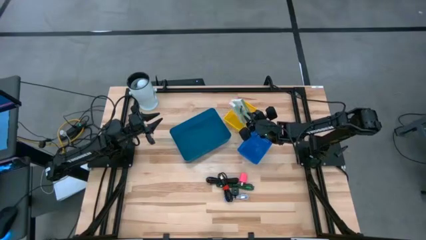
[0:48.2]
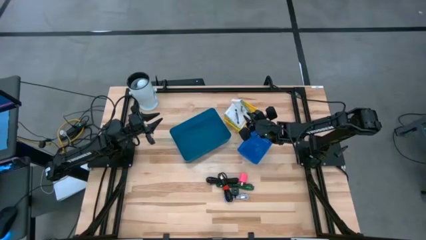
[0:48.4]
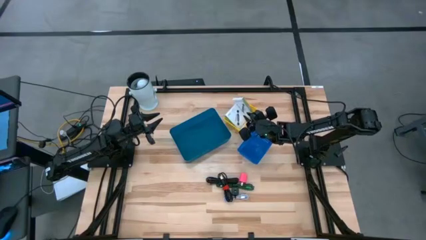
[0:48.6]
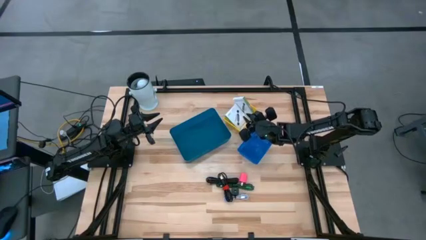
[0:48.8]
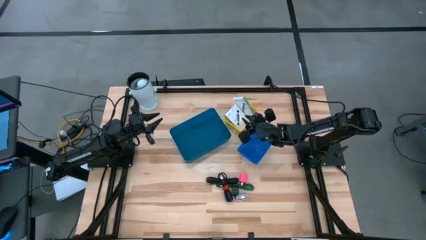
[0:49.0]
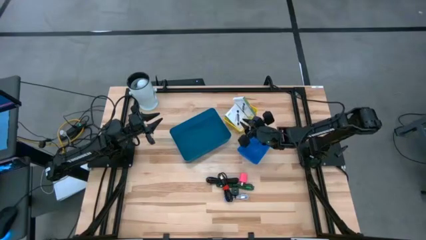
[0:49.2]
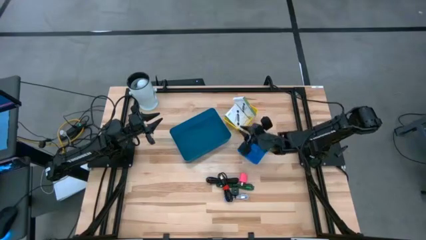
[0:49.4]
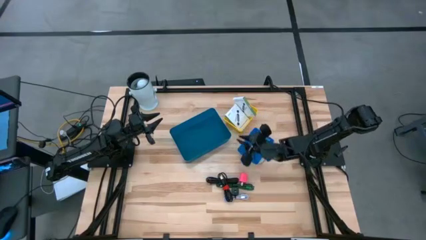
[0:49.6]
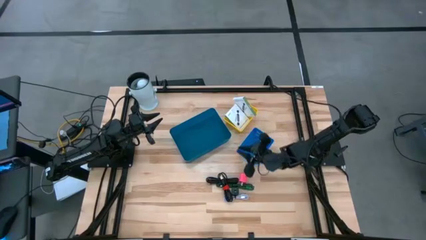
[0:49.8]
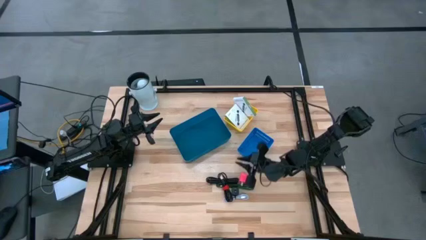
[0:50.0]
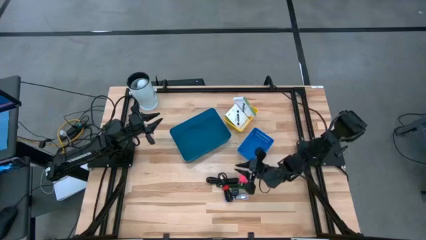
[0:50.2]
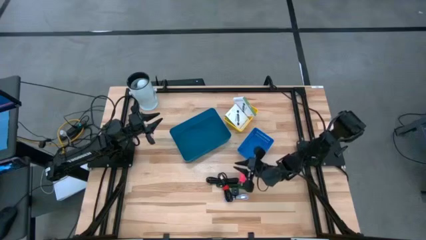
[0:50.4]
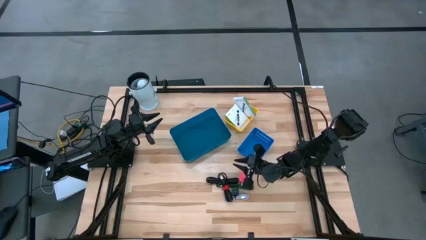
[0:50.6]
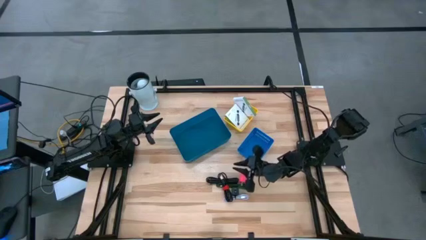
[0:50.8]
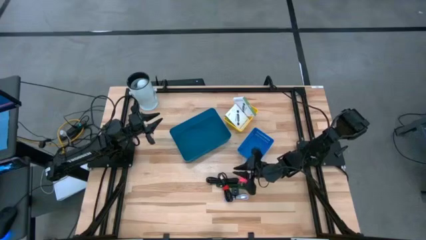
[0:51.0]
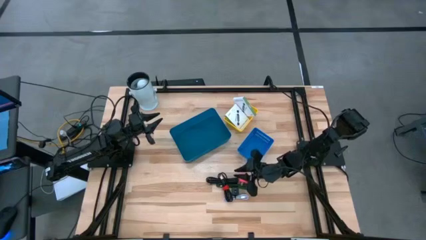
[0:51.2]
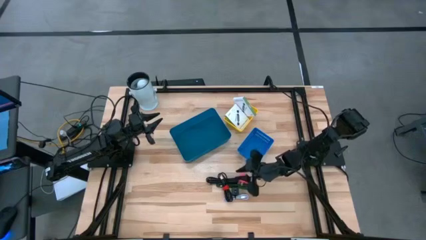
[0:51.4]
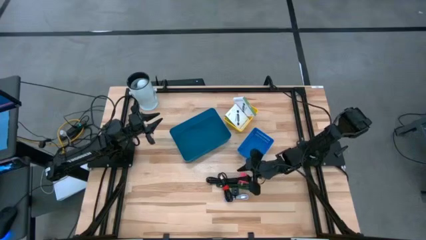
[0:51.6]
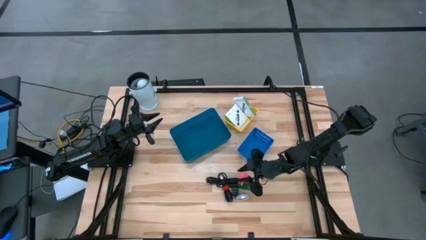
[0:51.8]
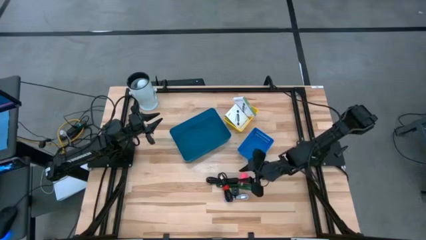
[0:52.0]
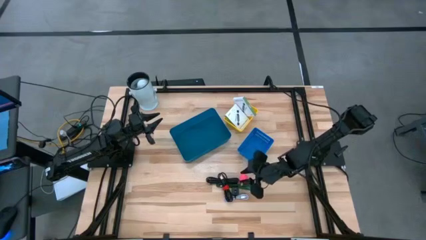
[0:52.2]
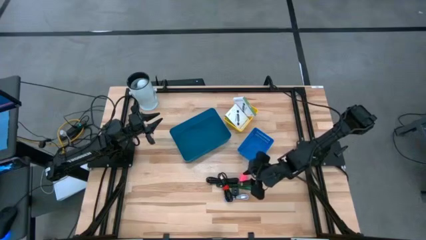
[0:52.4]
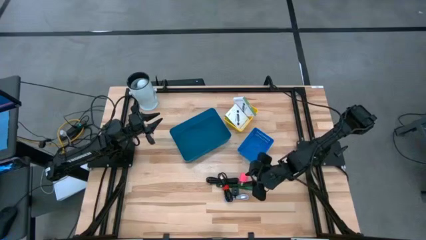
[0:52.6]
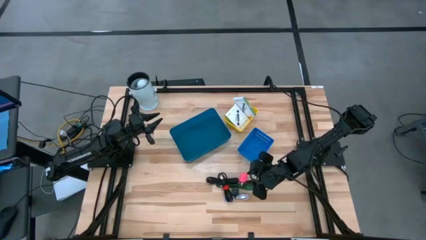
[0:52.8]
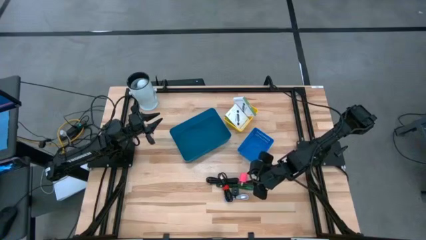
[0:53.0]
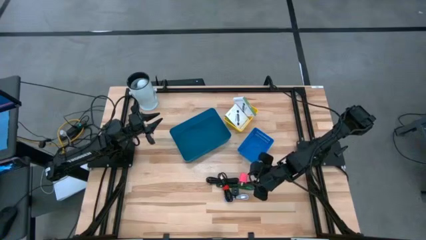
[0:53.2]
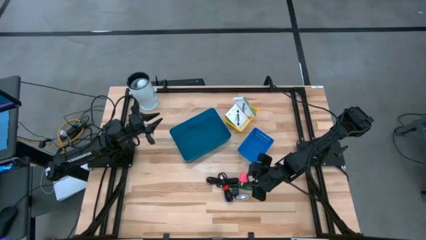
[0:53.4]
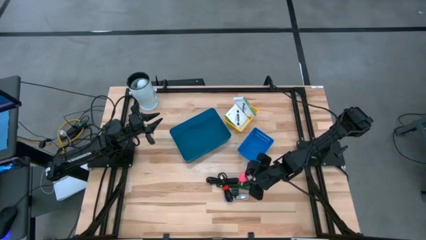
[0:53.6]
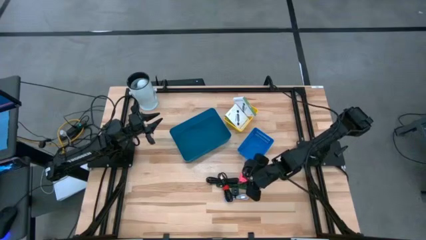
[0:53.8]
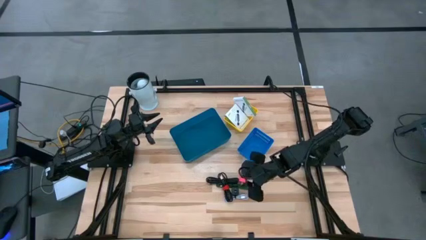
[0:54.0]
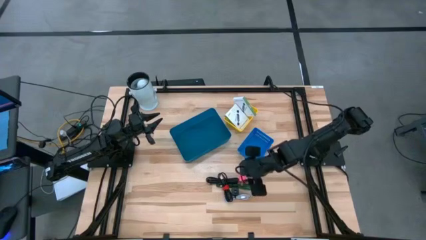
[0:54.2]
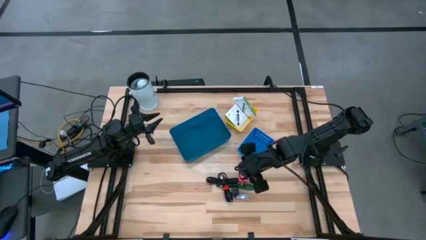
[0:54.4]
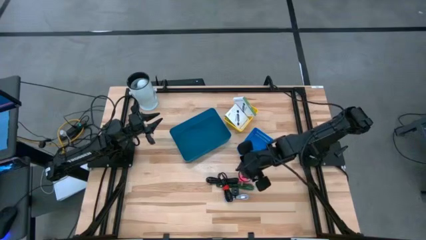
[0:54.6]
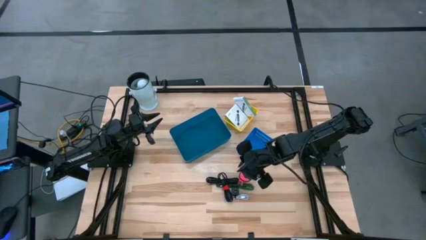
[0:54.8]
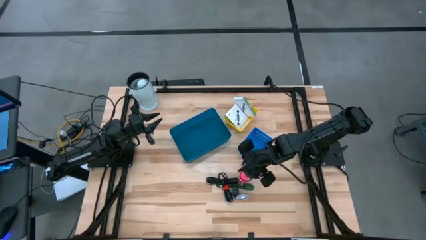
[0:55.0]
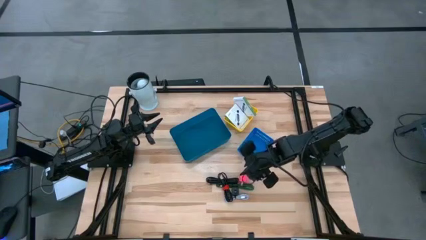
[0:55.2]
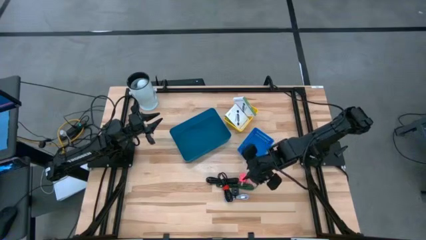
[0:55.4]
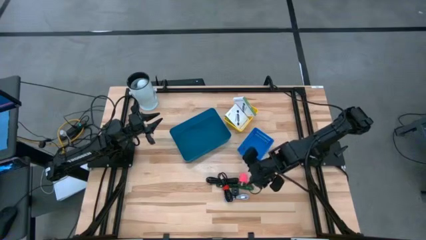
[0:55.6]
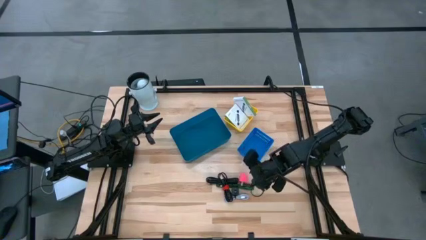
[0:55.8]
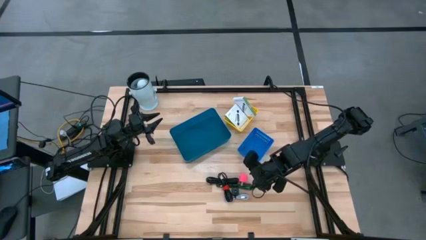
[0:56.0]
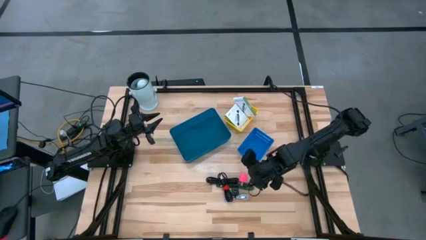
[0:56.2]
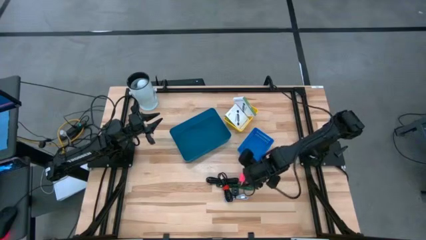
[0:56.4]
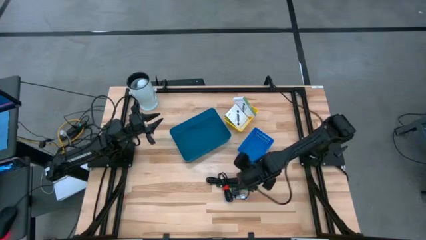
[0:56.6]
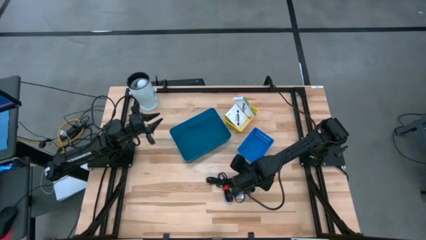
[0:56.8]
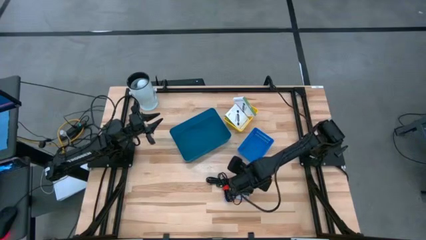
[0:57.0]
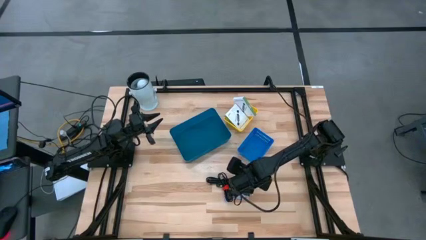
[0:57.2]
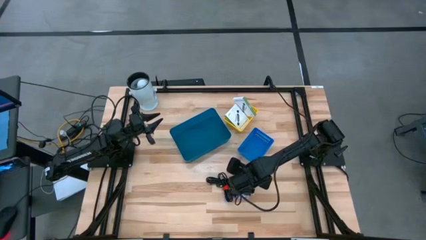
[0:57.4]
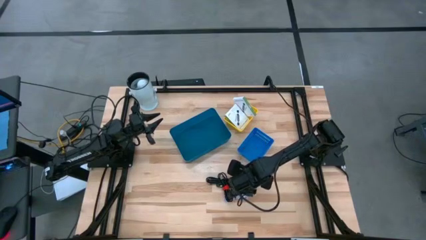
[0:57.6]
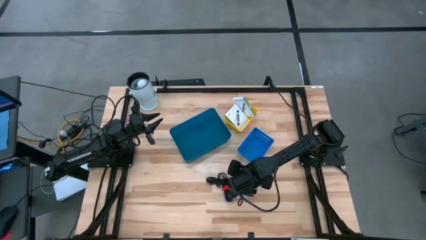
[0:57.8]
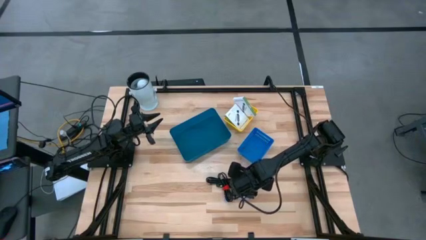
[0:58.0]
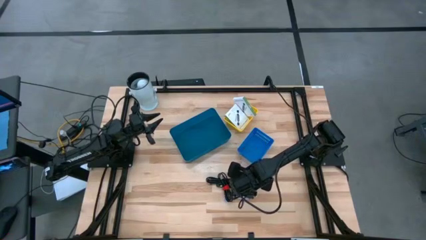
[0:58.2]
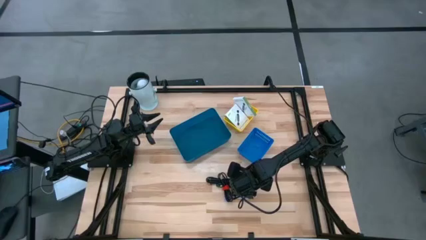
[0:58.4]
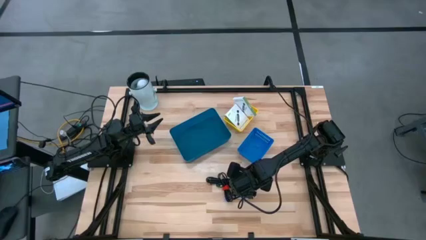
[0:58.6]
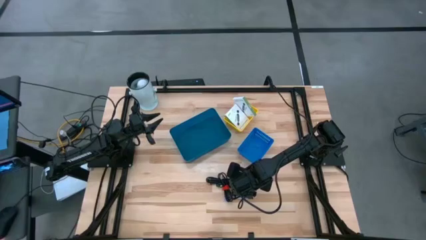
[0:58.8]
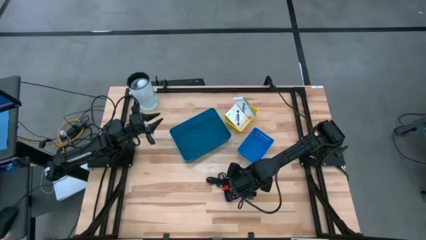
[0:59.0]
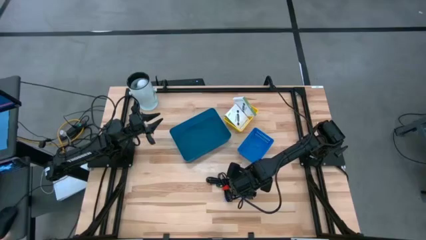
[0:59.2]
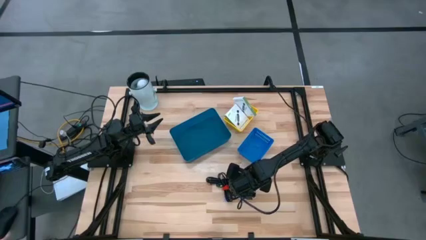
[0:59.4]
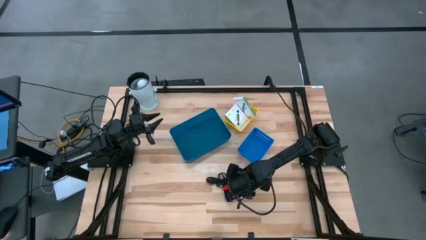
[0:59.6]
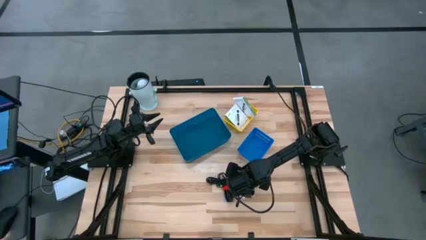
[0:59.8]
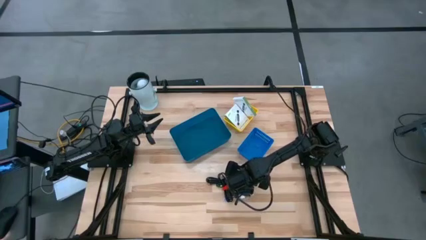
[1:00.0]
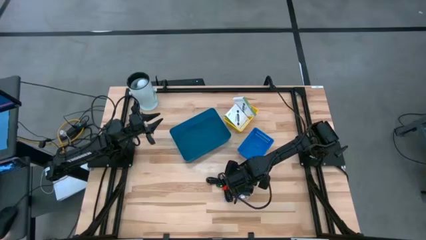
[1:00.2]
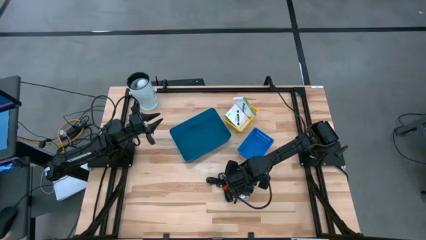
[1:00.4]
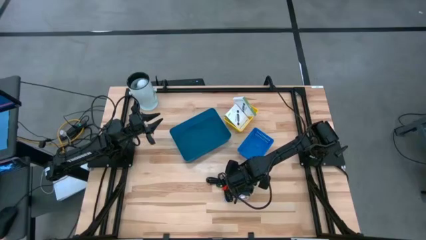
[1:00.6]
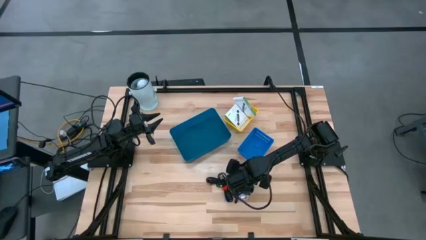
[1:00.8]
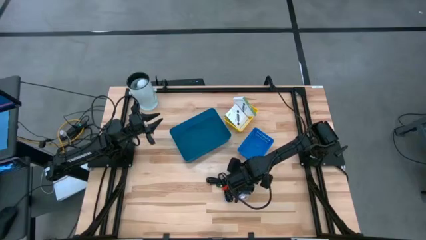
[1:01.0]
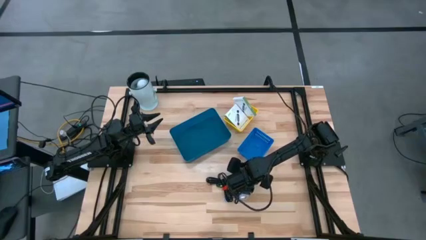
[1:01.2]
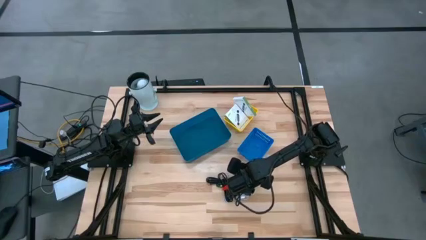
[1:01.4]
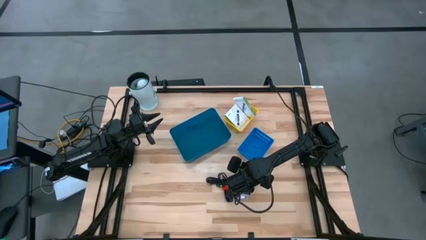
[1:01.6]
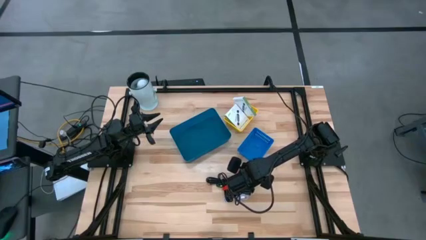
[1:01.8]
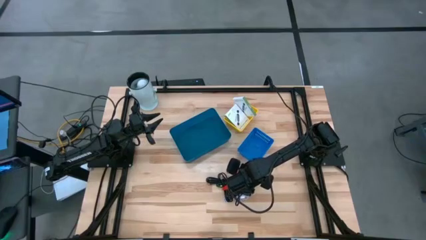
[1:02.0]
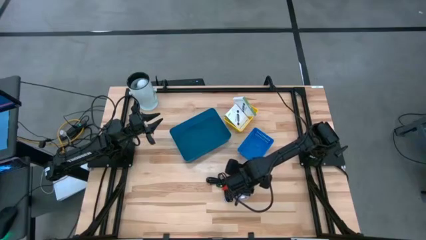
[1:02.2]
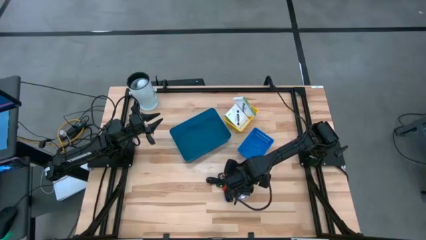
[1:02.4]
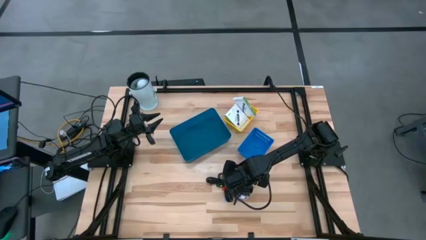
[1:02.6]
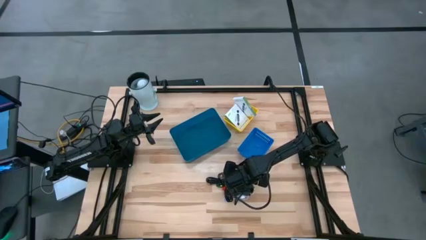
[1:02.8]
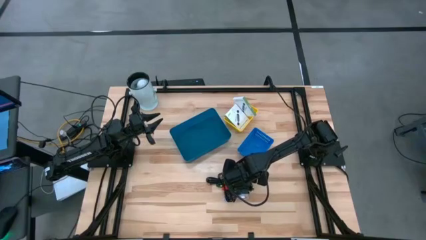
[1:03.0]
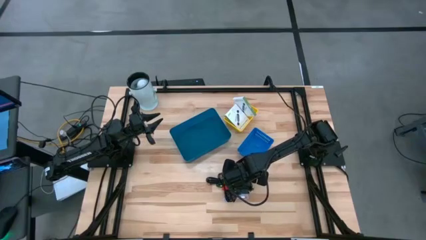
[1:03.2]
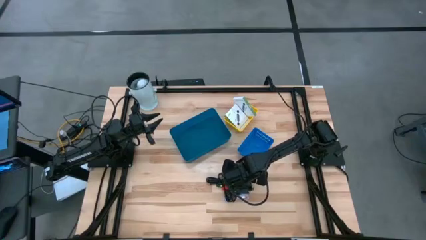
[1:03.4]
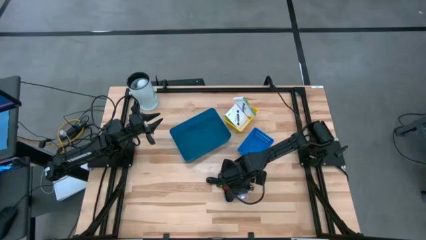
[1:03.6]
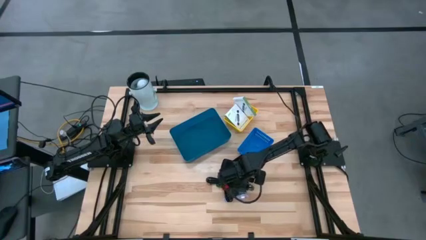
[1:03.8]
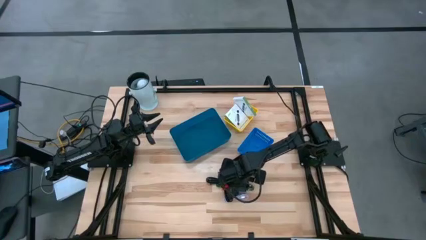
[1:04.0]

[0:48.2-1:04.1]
Task: Pick and place items into bin
Put the pink charger adapter into the blue bin
